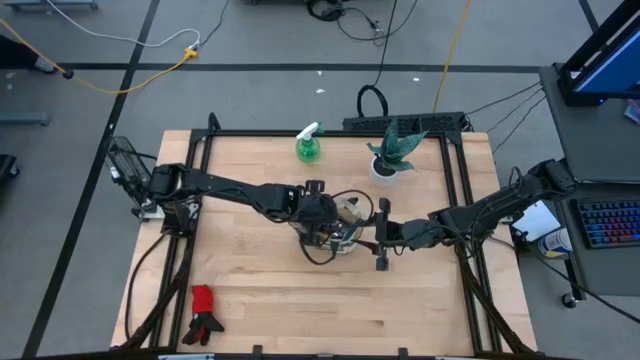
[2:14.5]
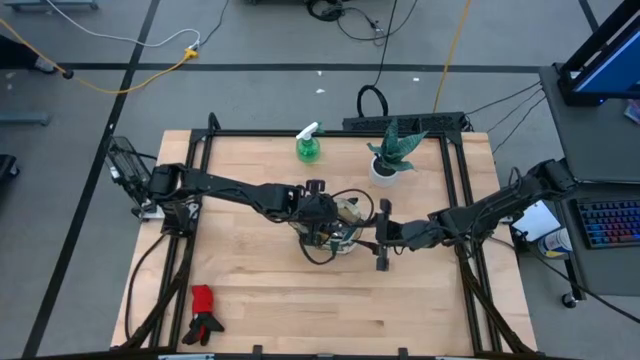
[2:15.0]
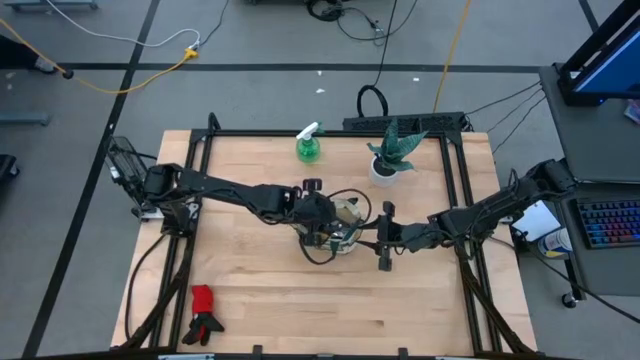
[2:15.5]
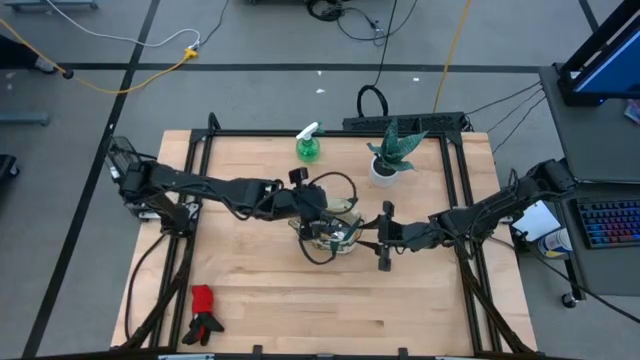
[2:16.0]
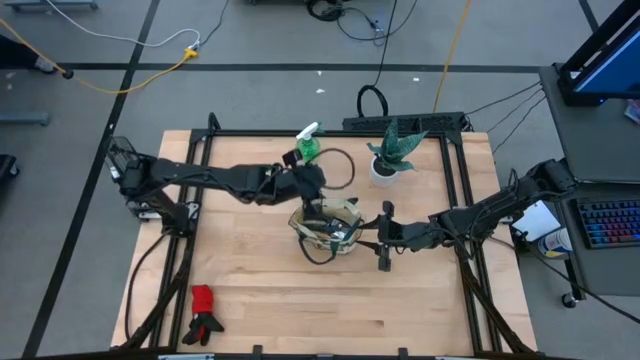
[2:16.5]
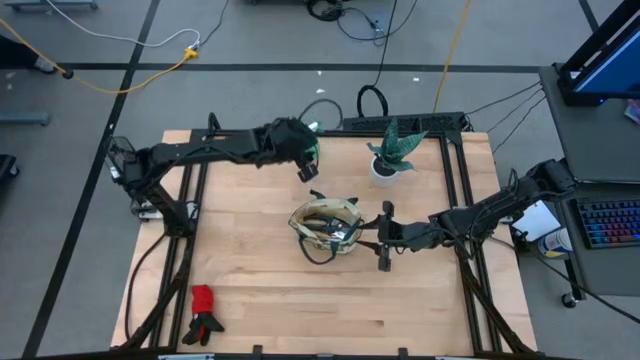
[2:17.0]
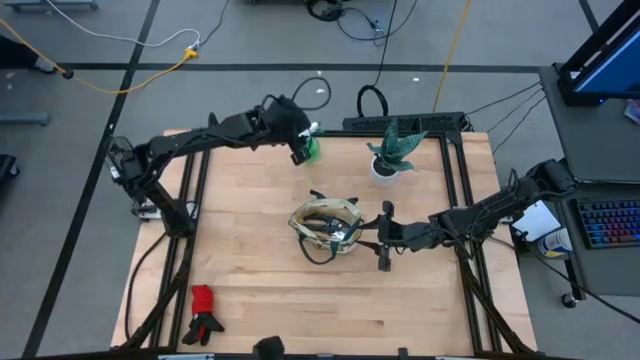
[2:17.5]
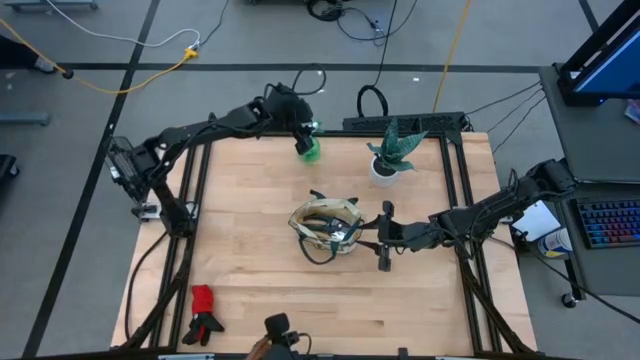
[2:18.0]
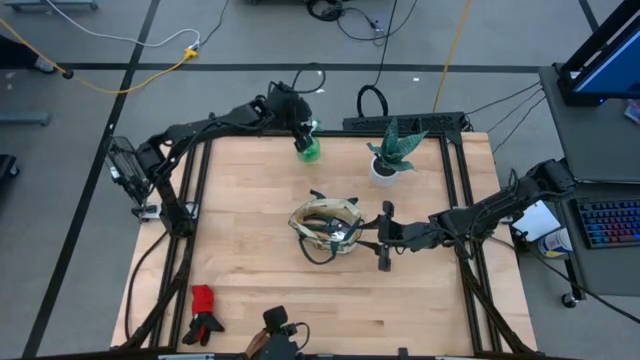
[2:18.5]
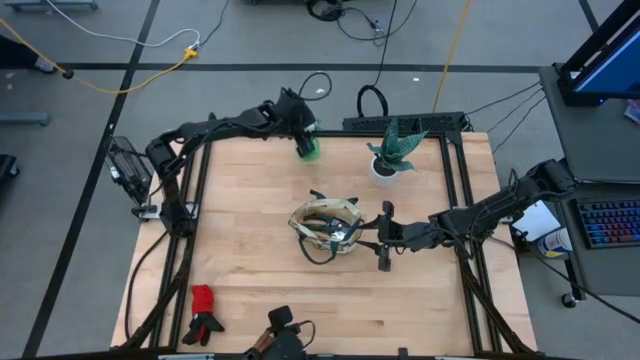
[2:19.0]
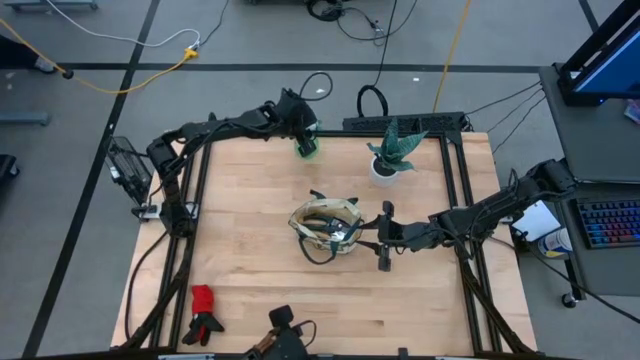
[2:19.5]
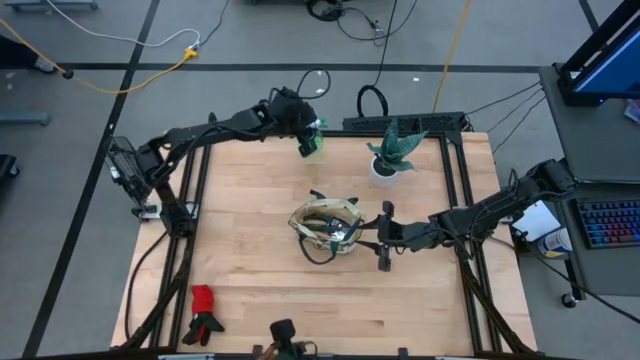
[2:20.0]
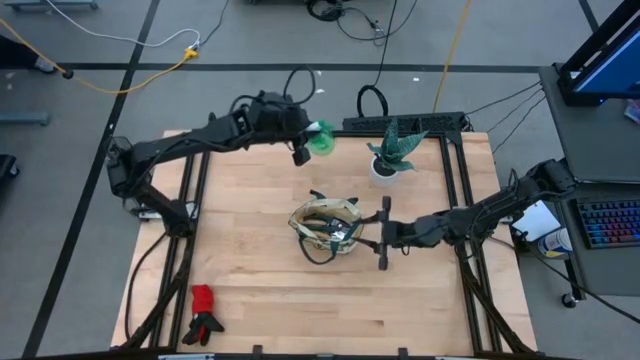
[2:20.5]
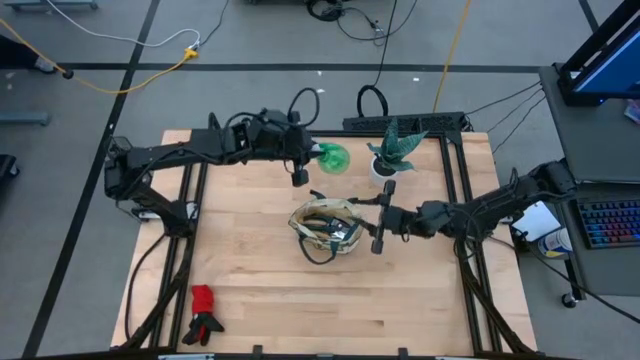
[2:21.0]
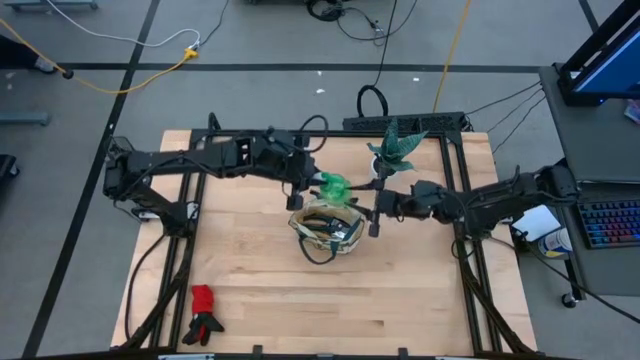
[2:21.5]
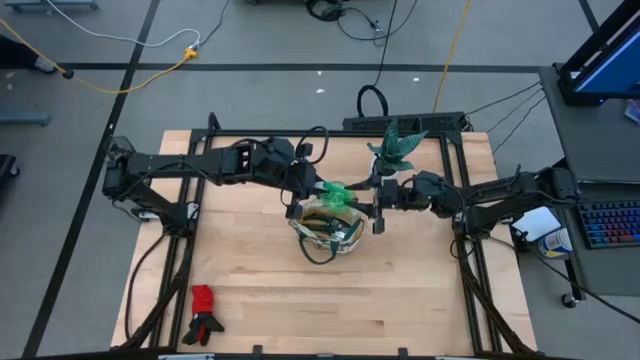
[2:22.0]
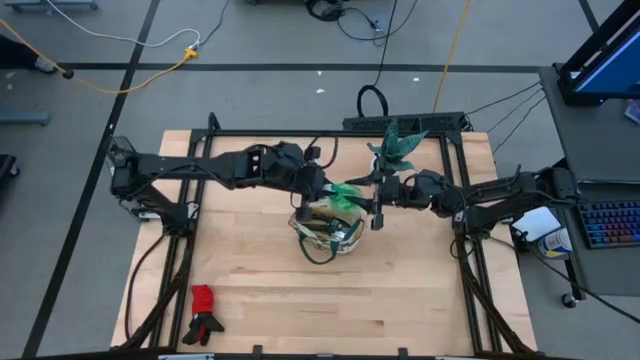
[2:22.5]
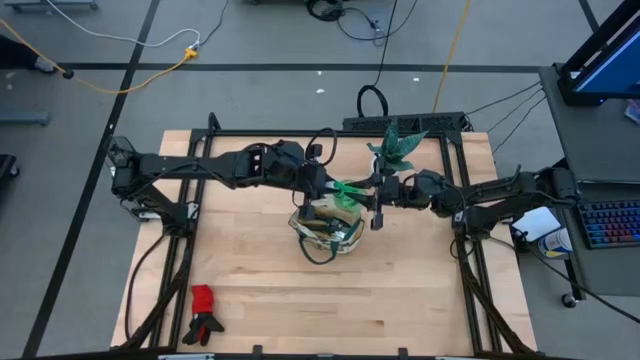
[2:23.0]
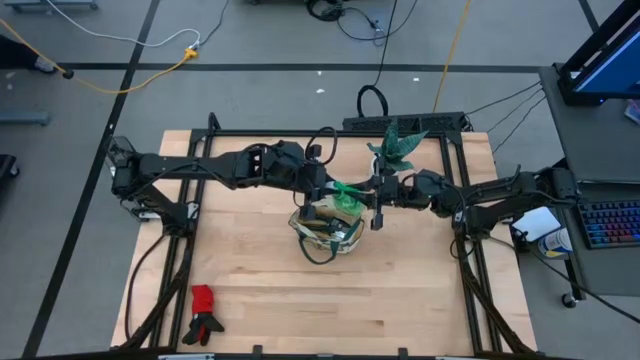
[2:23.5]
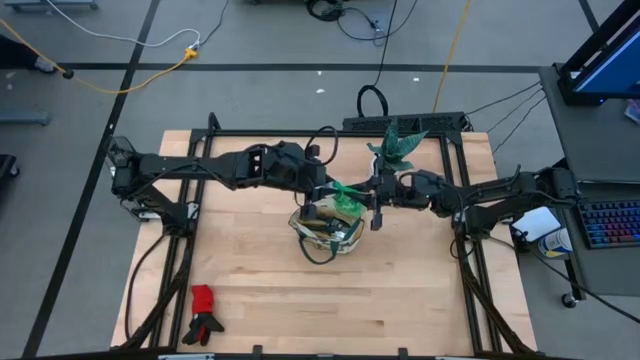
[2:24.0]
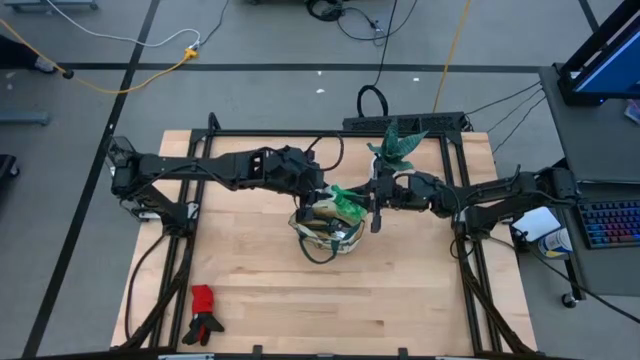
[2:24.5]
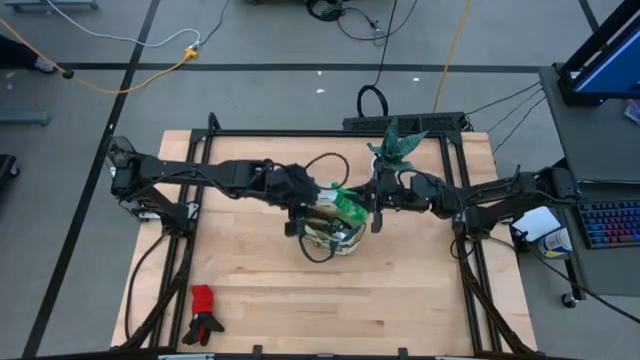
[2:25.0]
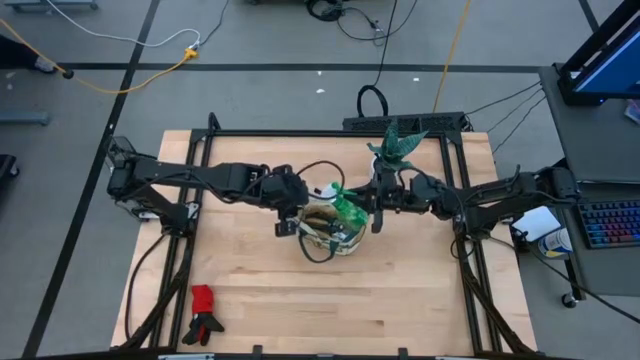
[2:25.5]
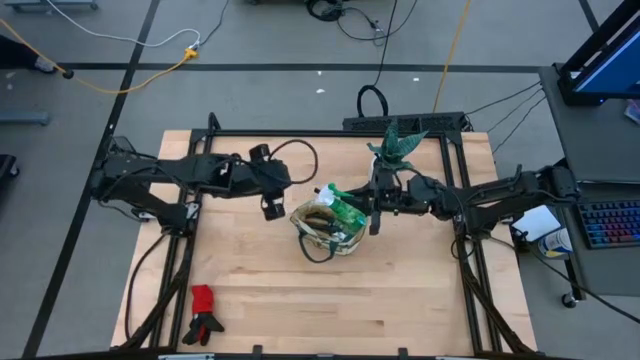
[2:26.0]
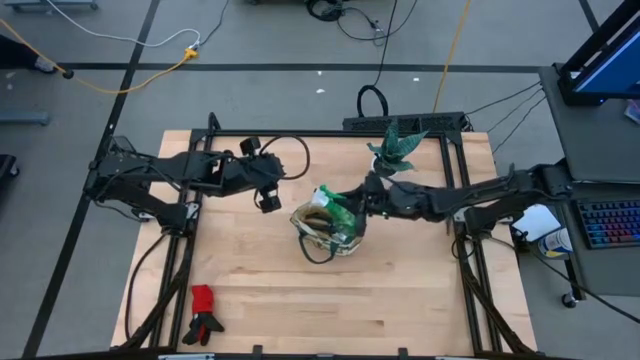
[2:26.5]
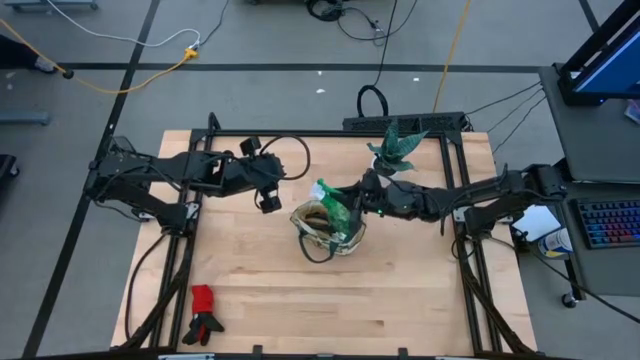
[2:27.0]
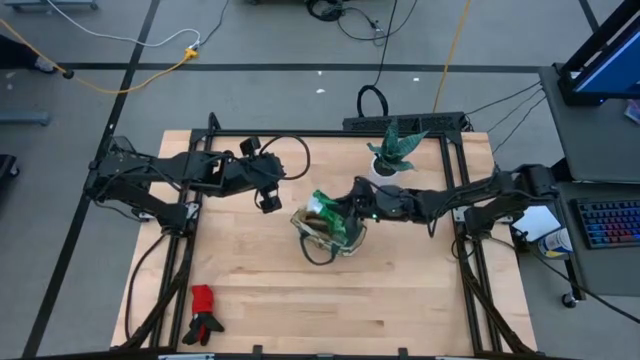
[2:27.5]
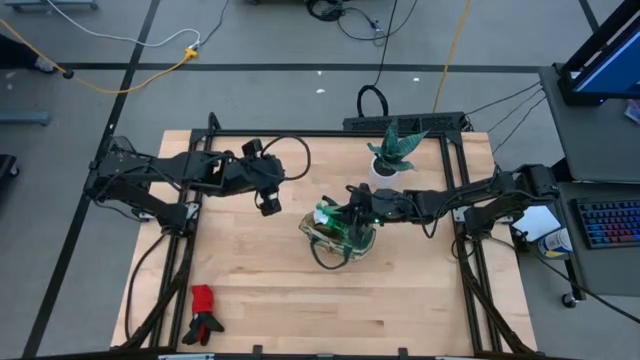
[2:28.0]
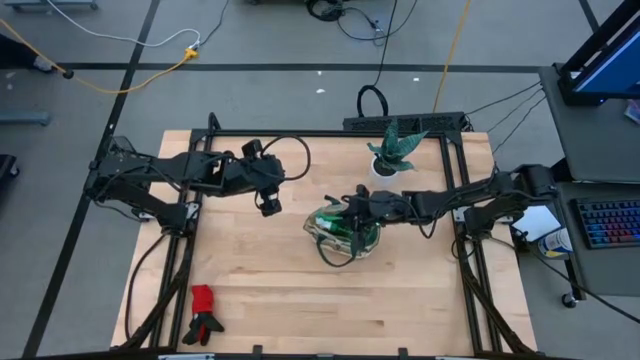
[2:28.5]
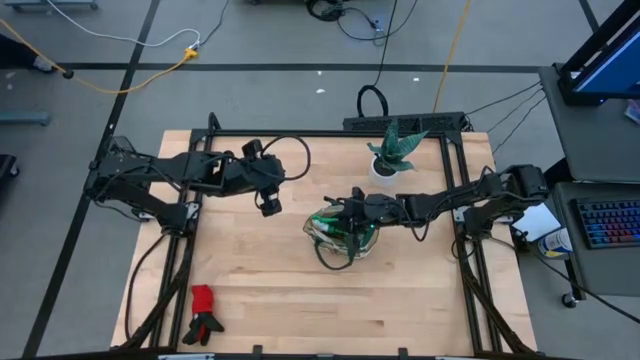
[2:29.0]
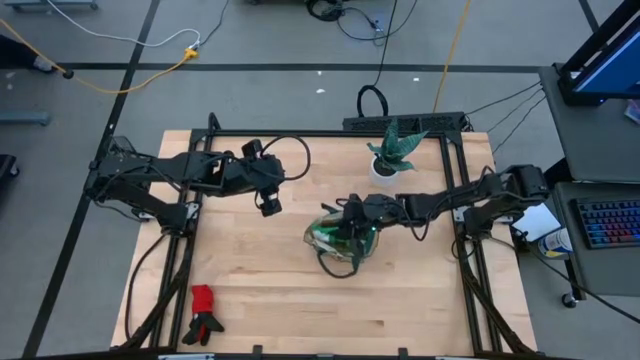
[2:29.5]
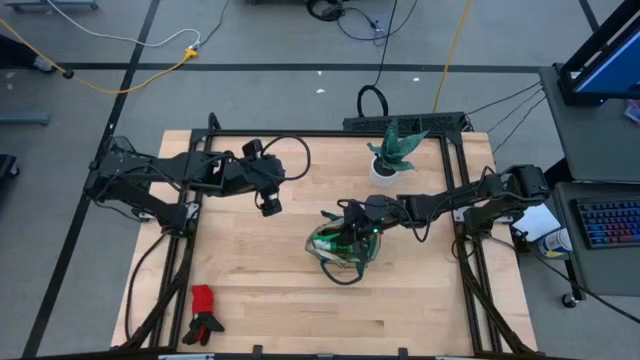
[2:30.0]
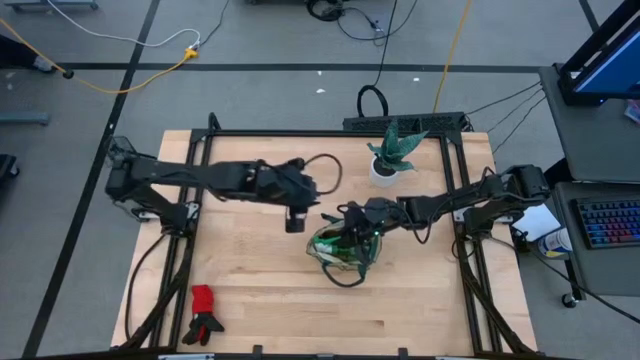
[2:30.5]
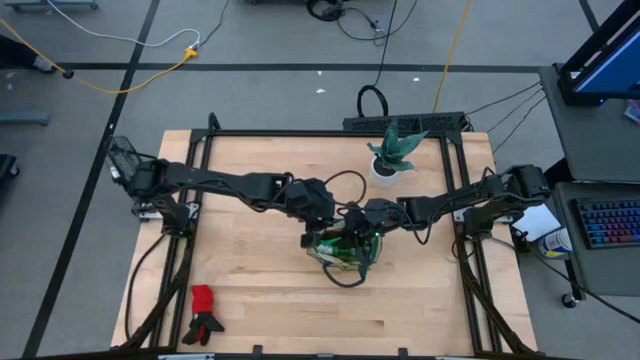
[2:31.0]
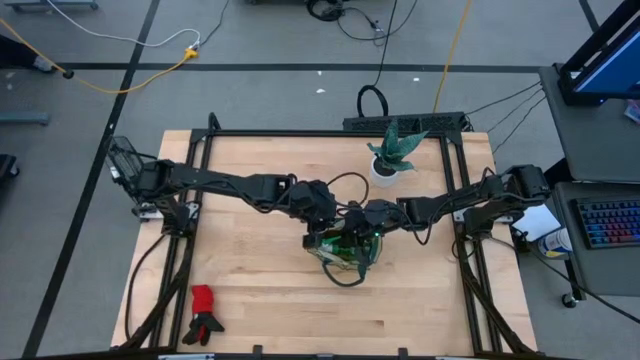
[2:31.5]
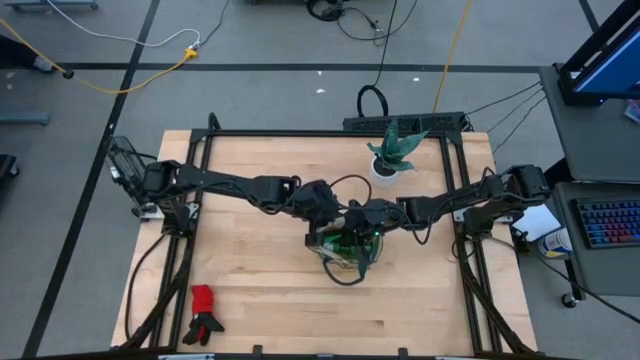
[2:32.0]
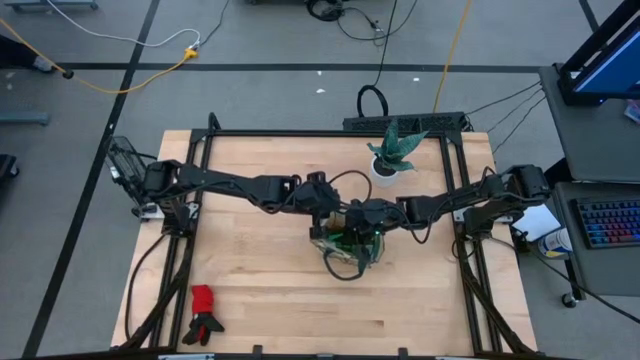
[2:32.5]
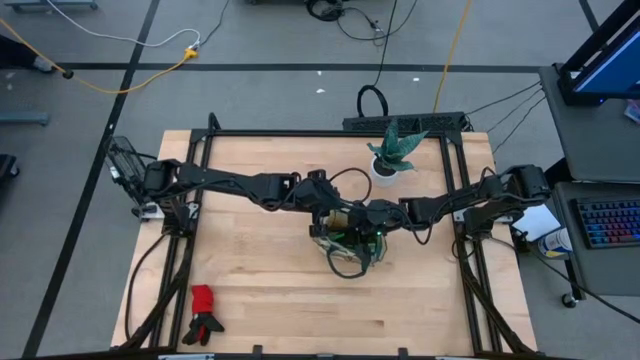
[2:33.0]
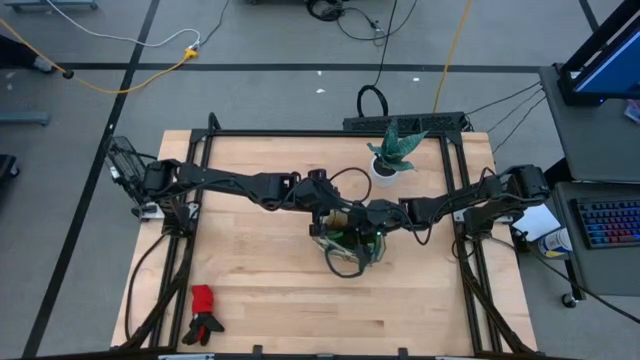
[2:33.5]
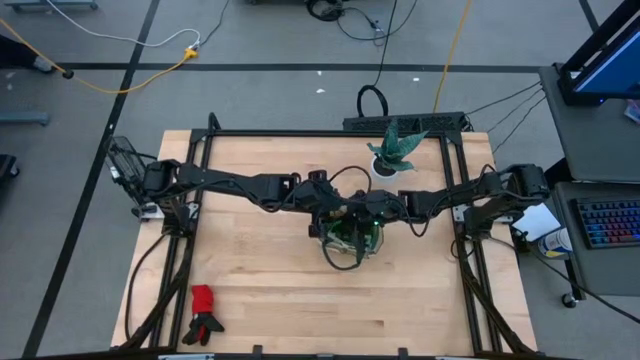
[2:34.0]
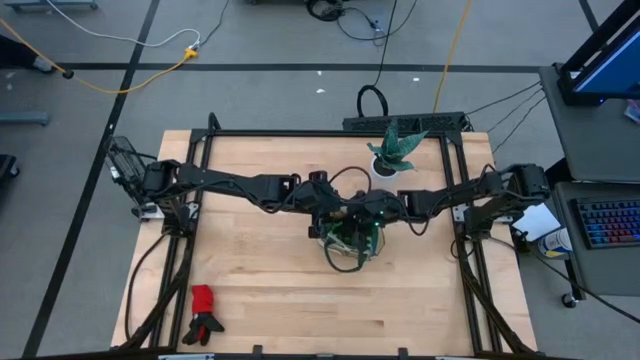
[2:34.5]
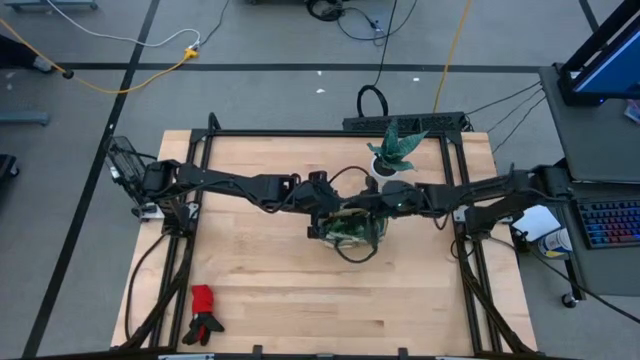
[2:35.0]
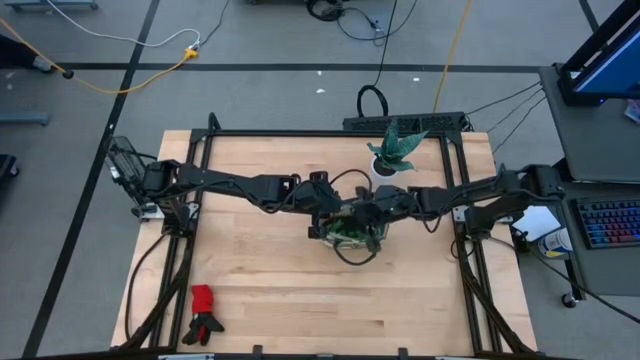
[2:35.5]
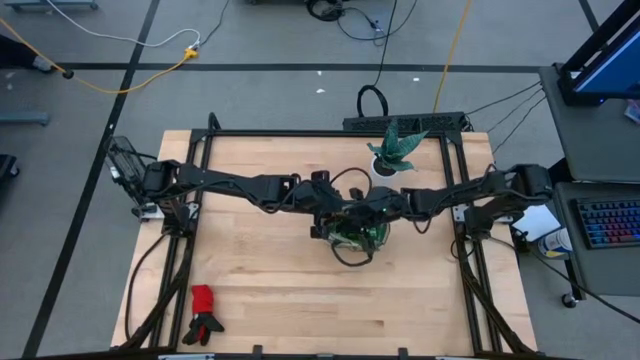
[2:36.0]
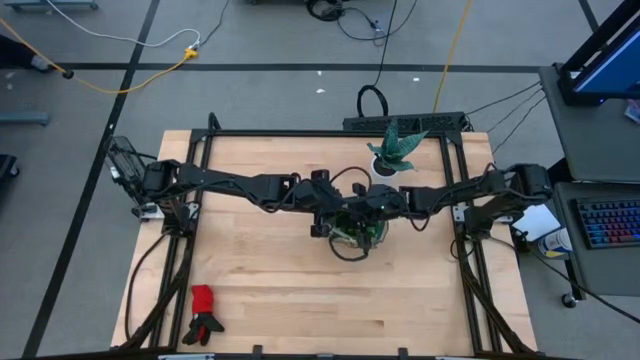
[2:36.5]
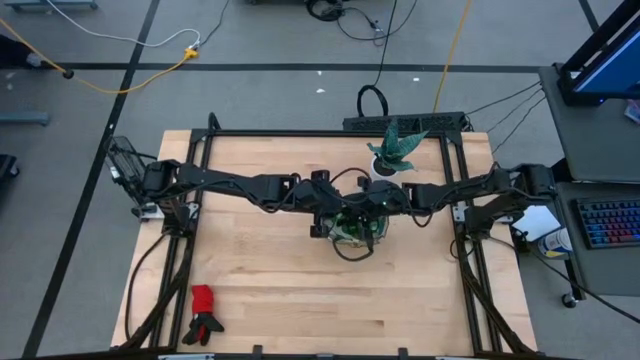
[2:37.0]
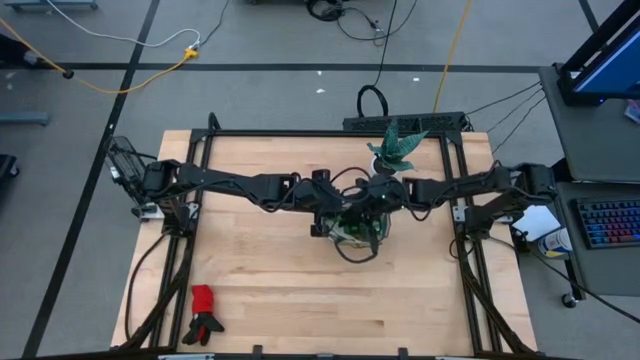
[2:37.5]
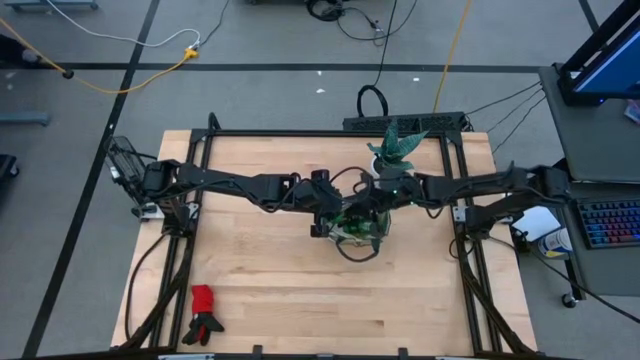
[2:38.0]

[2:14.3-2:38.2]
Task: Pick & Place Garden tools in Gardening bag
Put the green spray bottle into the gardening bag
